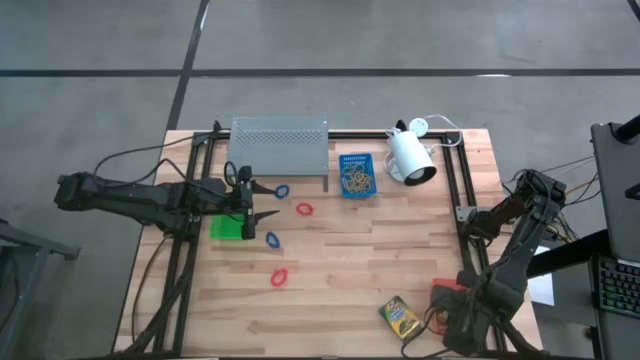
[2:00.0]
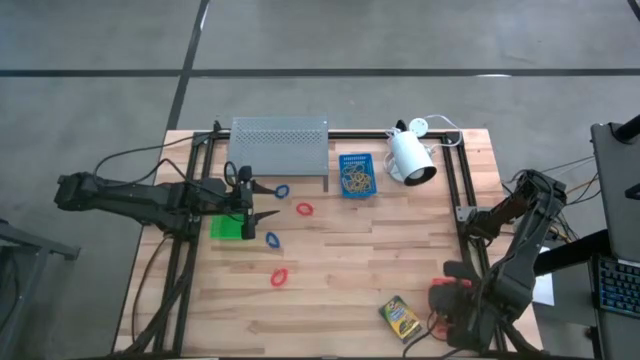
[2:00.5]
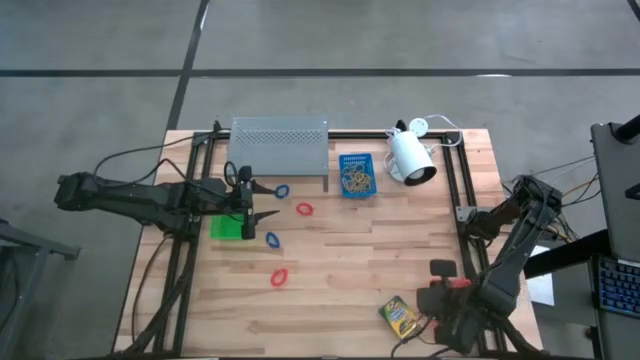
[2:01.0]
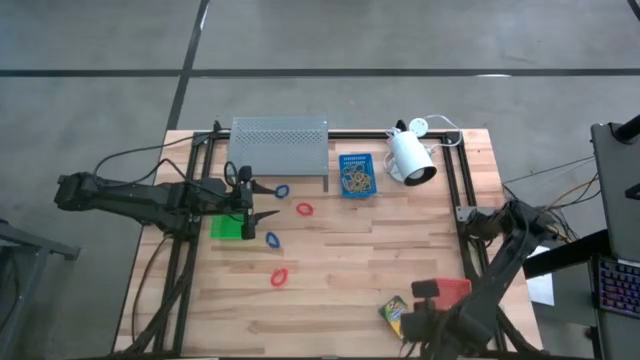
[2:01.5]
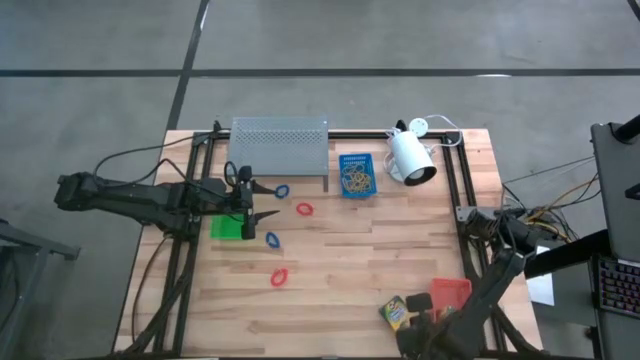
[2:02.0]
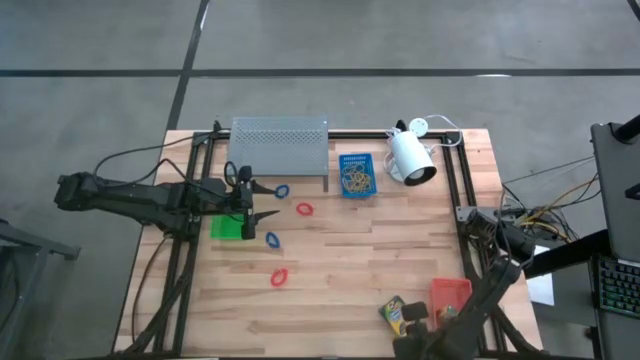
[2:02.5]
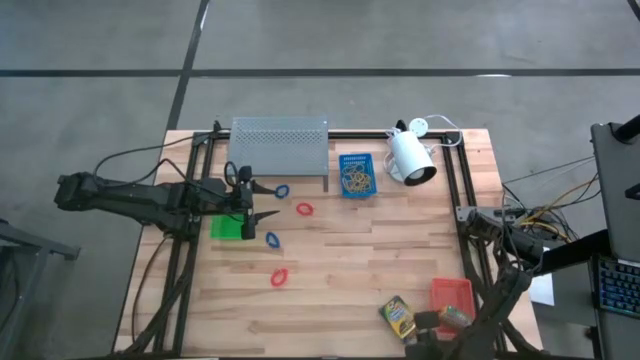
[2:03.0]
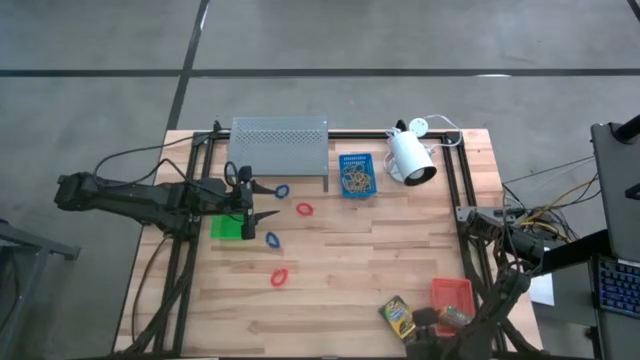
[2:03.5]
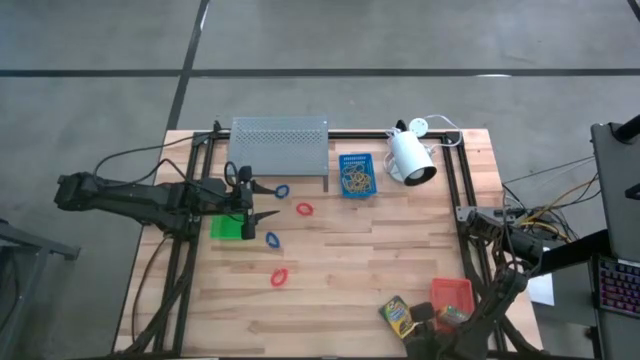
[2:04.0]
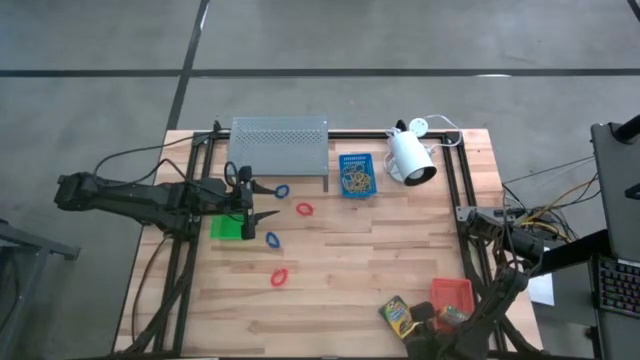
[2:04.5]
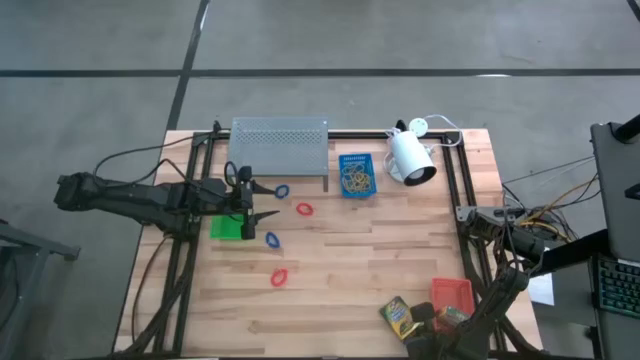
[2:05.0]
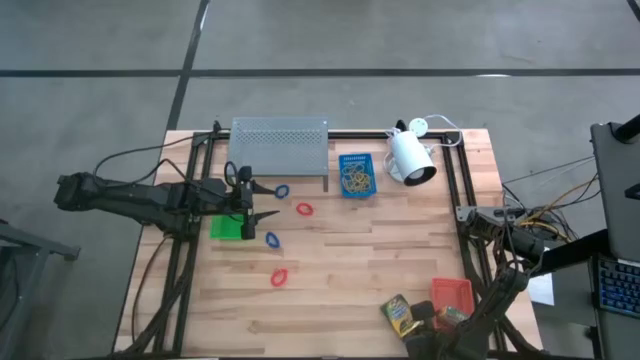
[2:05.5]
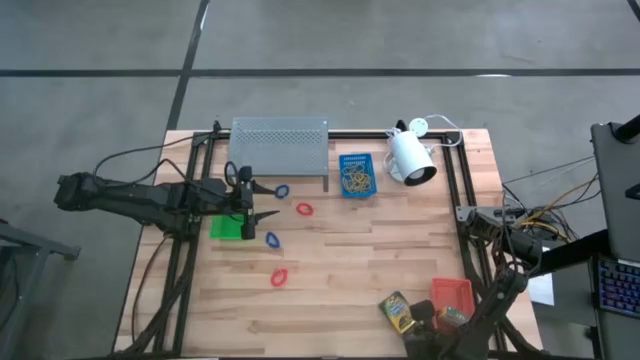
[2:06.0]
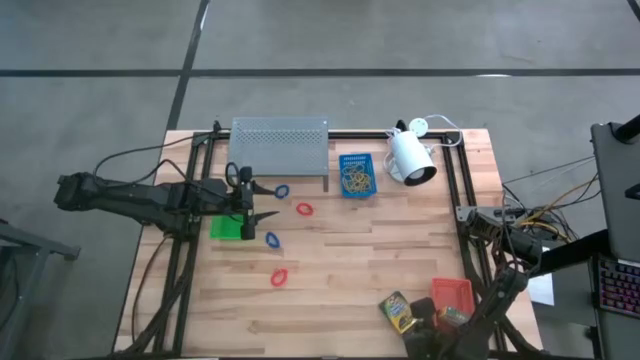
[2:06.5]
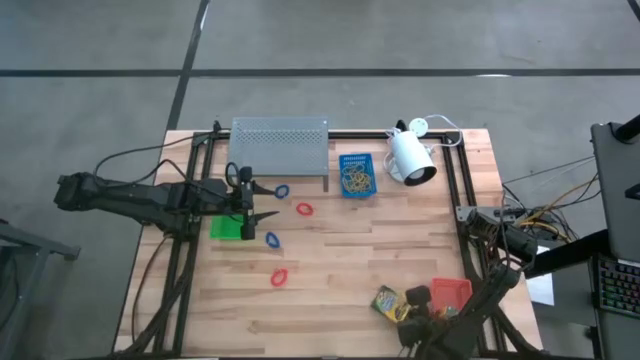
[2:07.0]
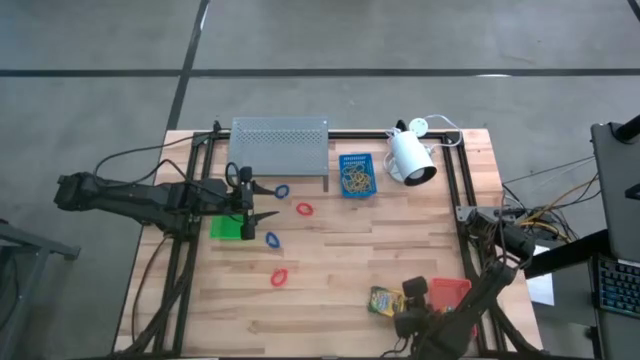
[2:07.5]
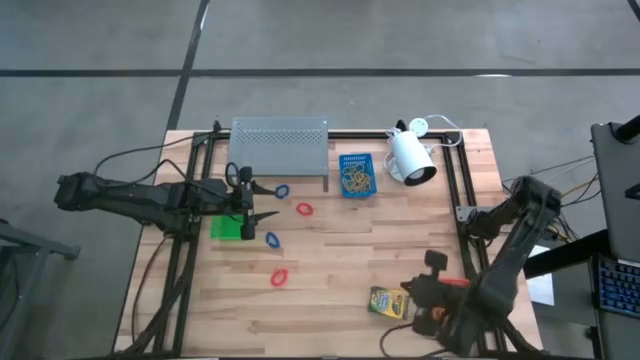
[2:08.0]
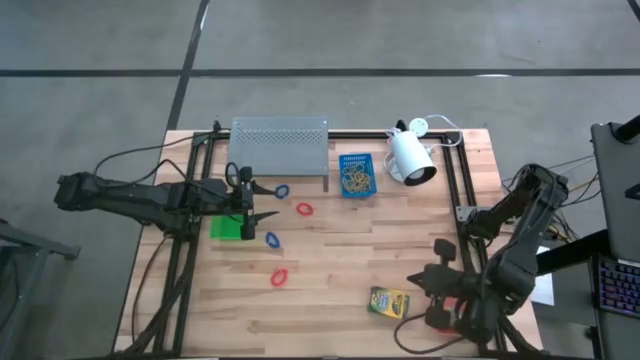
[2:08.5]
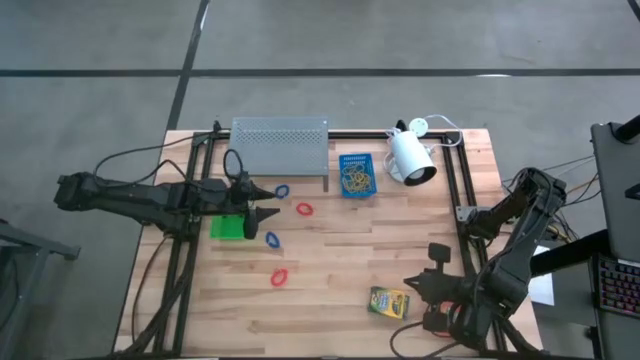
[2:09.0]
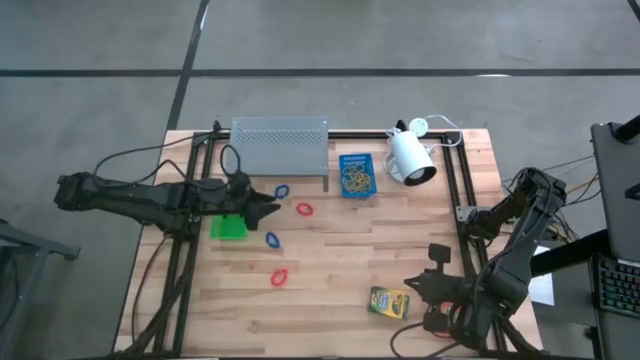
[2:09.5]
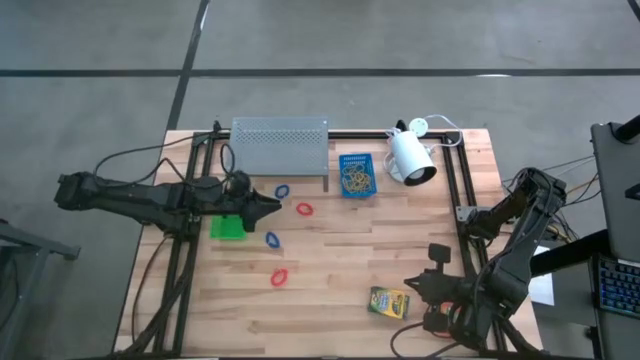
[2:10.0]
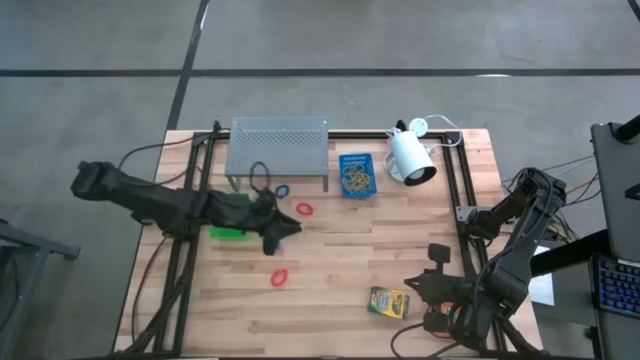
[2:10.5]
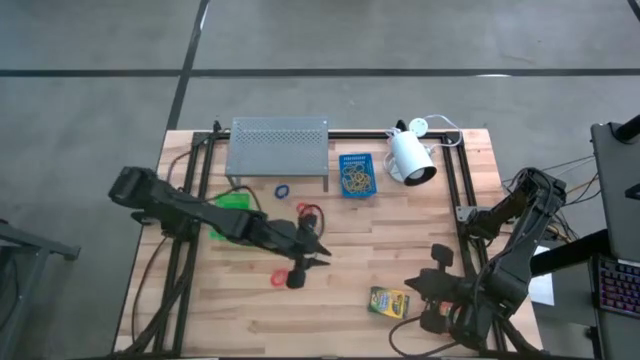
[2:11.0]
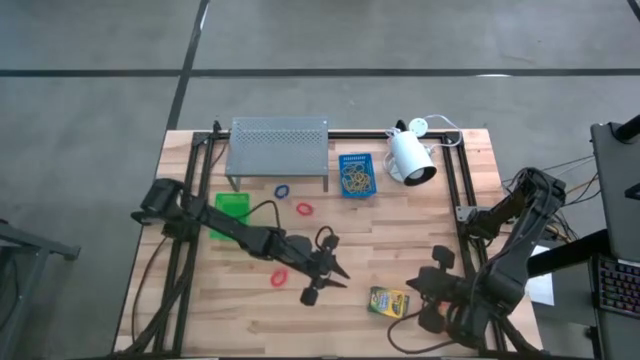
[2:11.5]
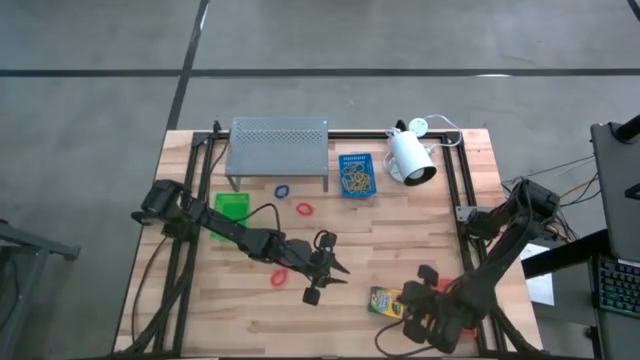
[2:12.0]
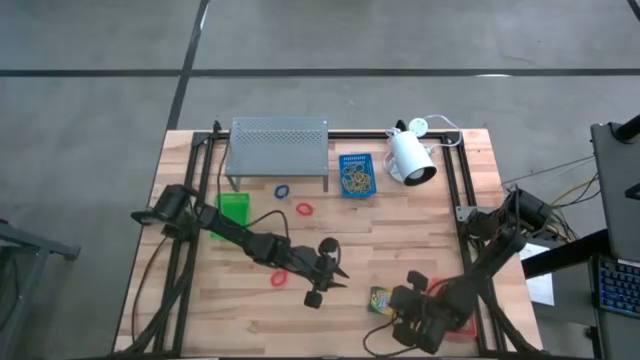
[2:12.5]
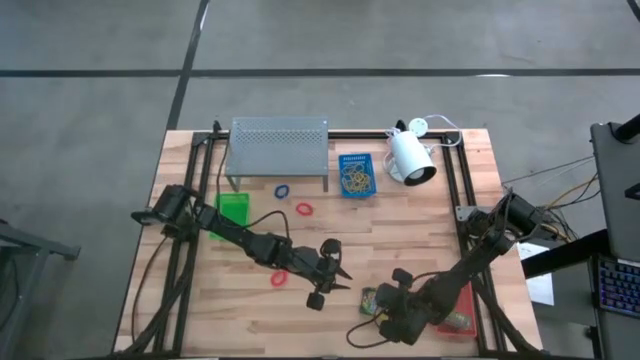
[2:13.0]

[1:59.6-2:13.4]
Task: Pick & Place Office Desk Supplies
Put the yellow crayon box into the orange bin

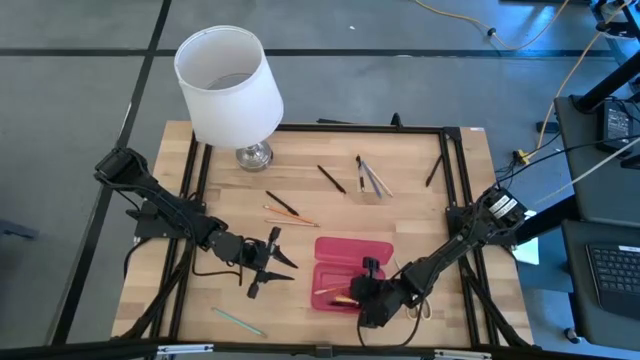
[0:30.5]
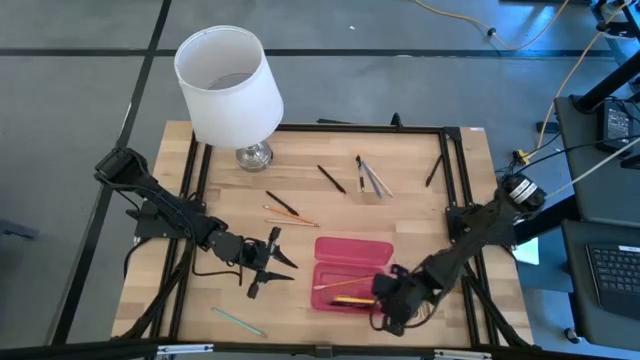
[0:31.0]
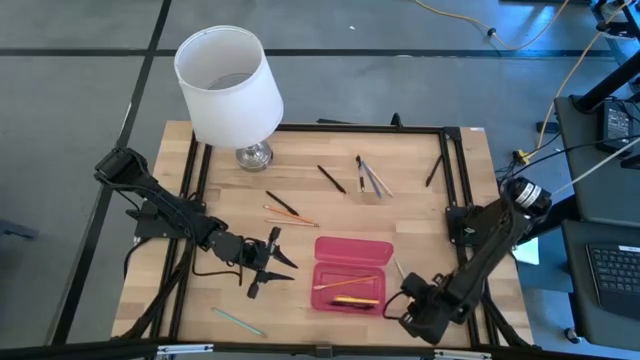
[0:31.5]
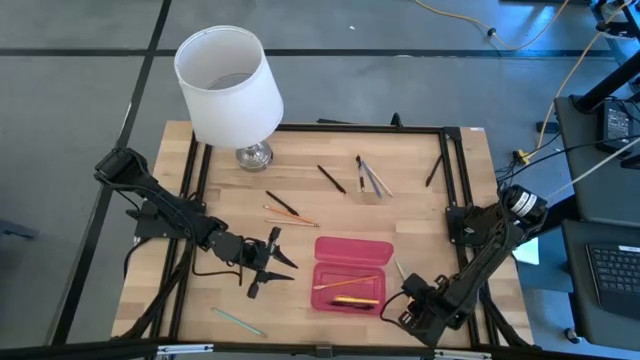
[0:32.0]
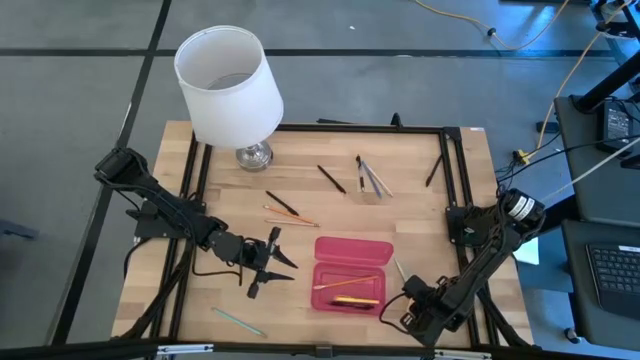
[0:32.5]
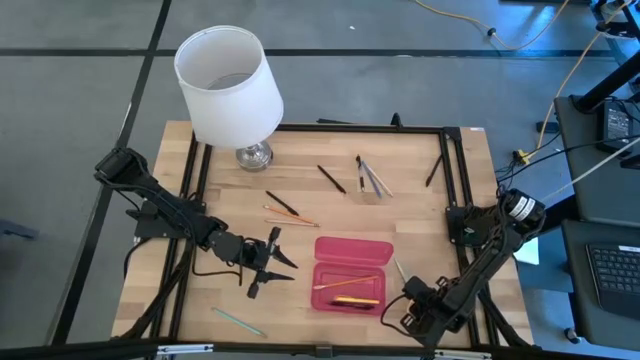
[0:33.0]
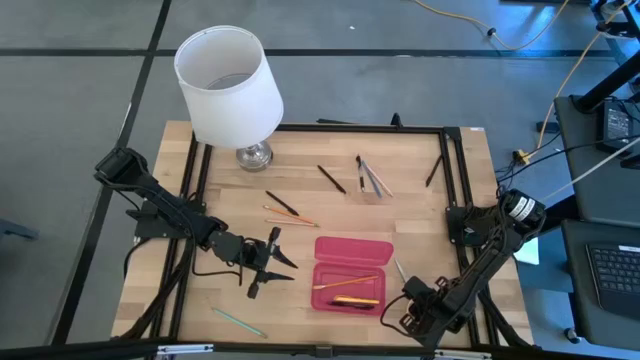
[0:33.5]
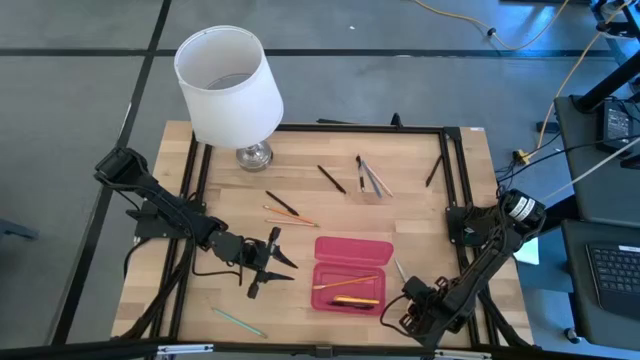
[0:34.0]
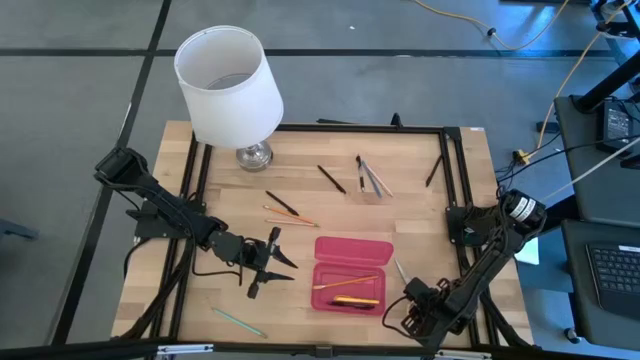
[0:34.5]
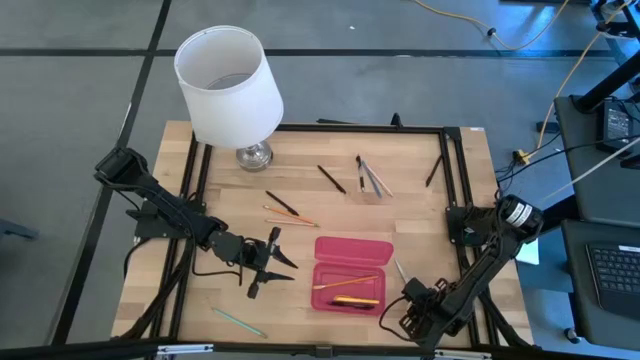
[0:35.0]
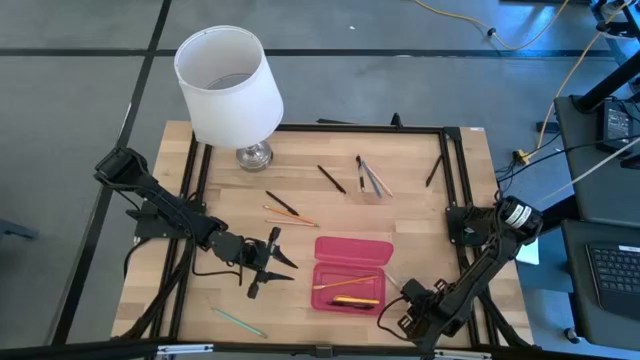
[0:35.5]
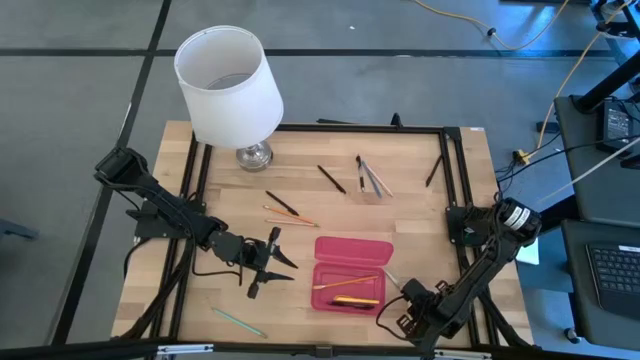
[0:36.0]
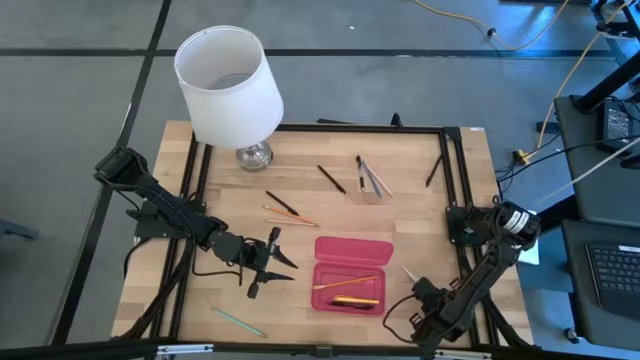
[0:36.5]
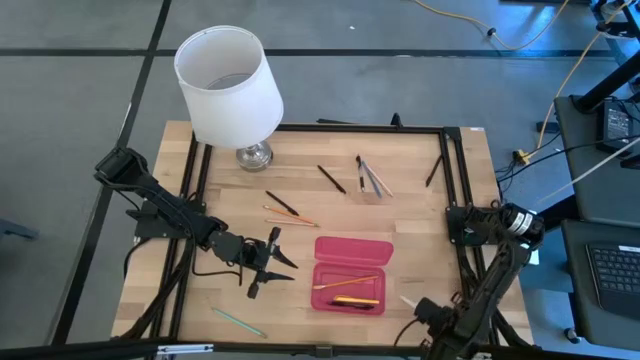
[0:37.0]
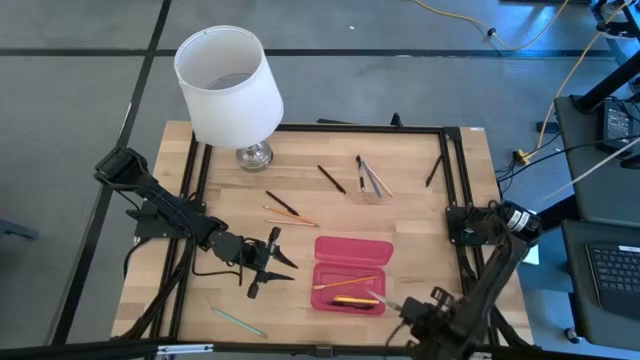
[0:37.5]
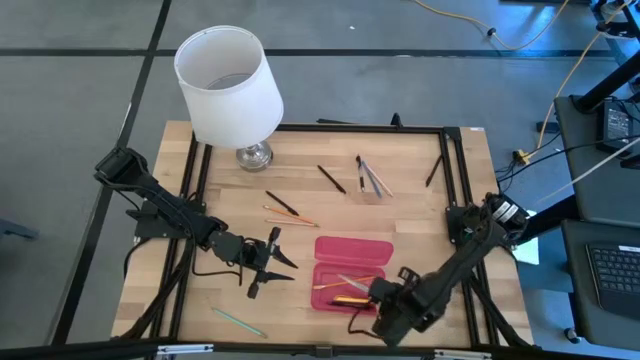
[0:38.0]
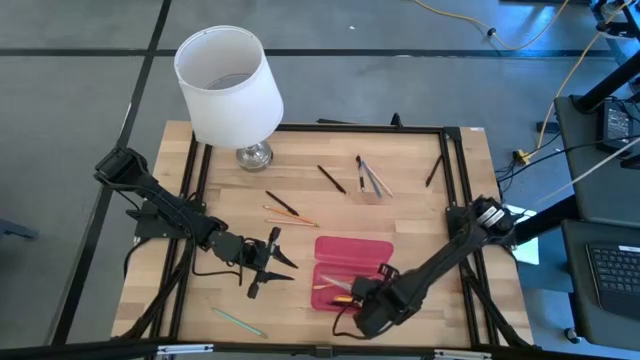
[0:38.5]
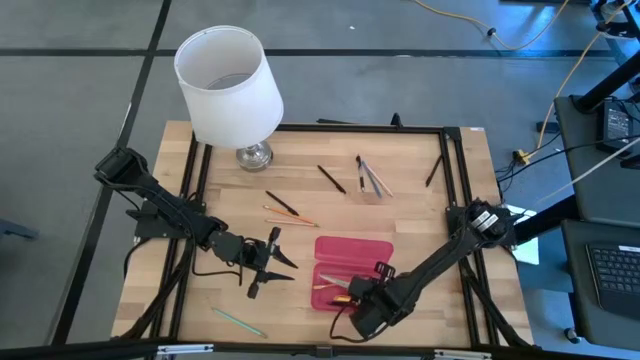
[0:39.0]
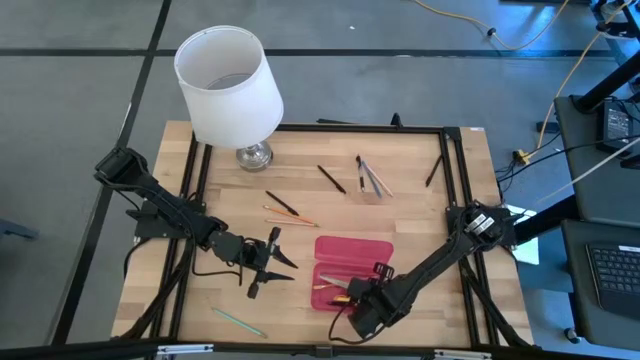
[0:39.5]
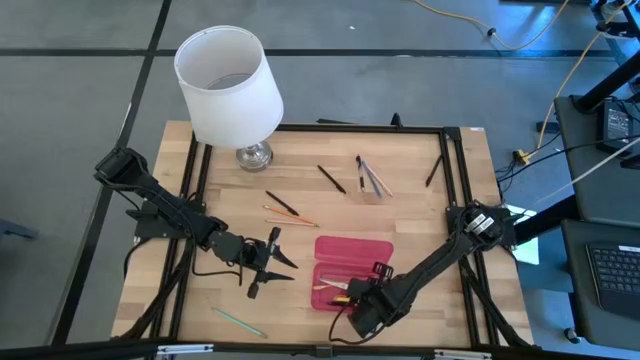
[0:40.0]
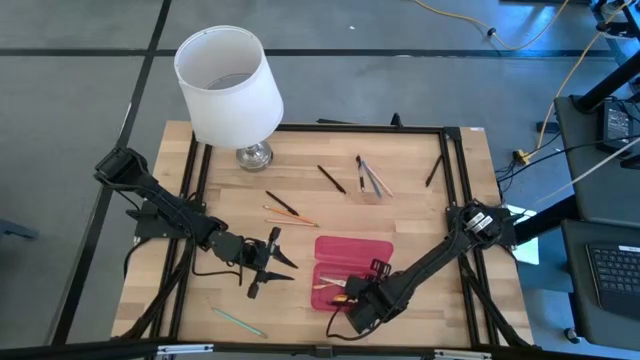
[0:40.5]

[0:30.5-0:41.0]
Task: Pick & place school supplies into a supply box
Put the yellow scissors into the pink supply box
